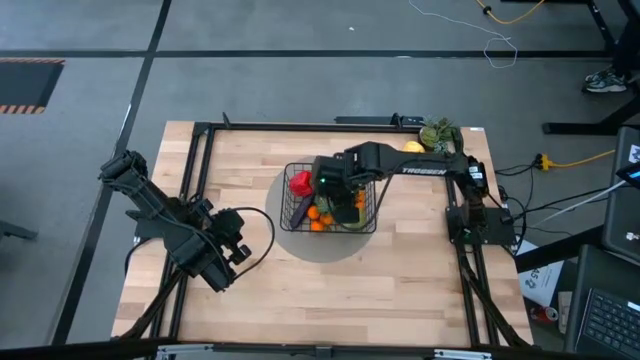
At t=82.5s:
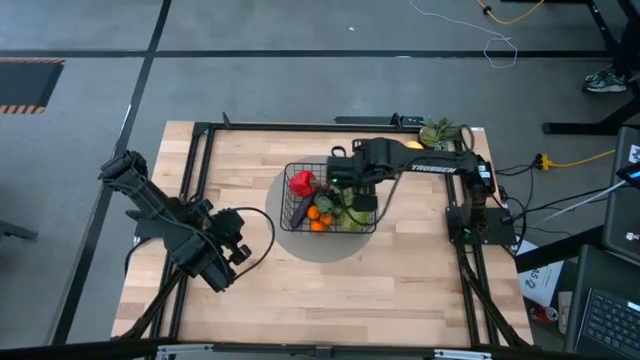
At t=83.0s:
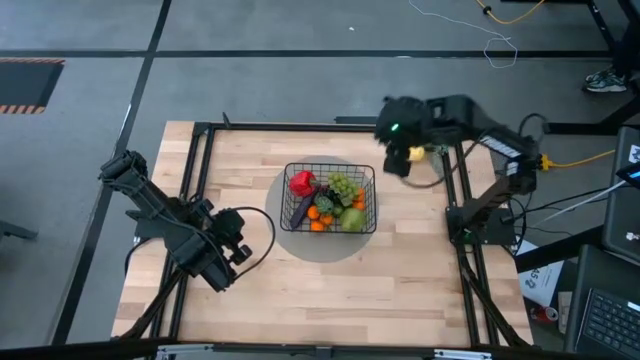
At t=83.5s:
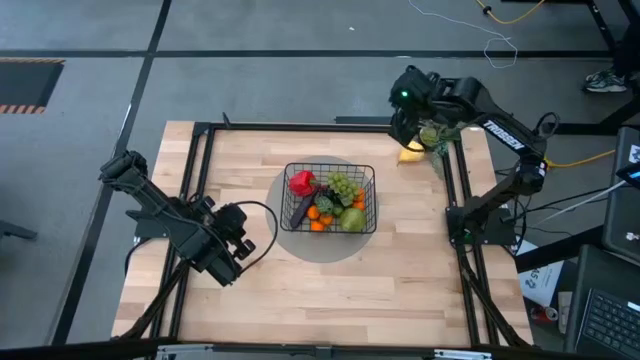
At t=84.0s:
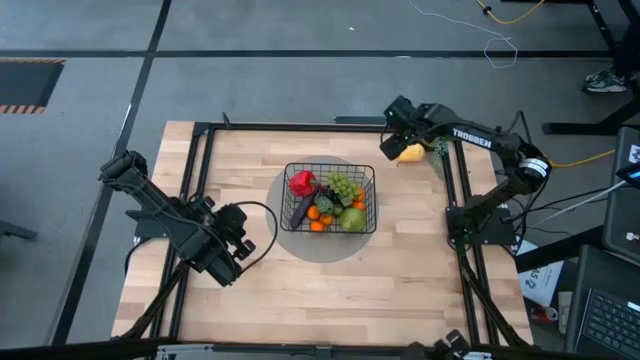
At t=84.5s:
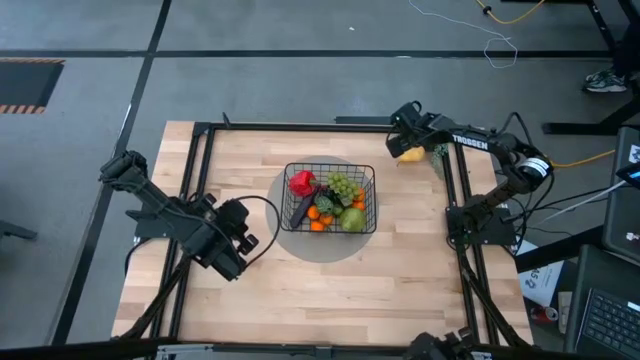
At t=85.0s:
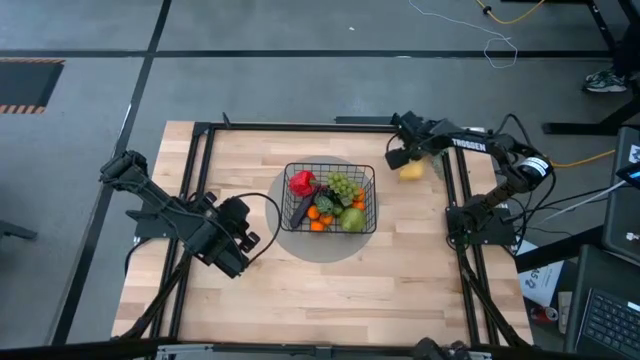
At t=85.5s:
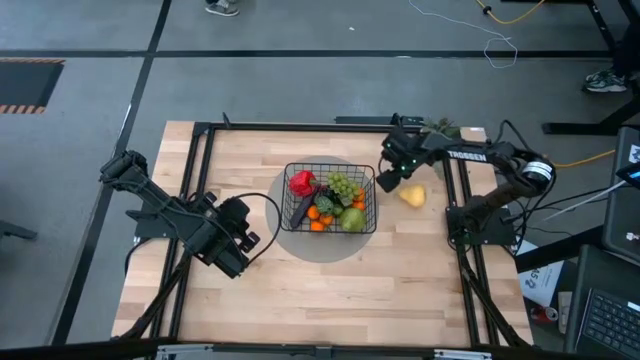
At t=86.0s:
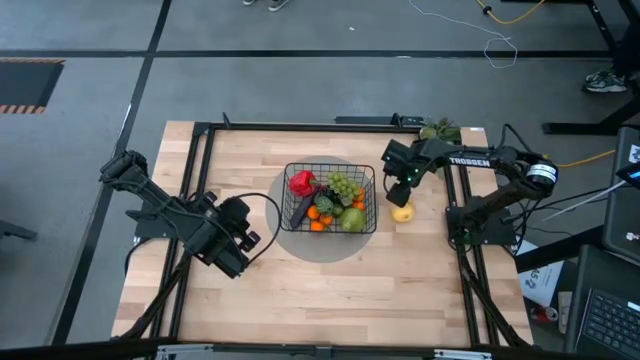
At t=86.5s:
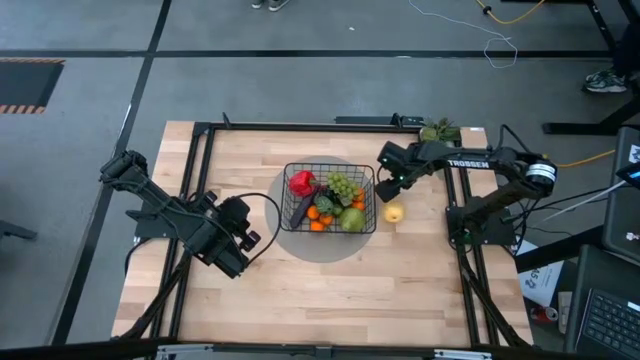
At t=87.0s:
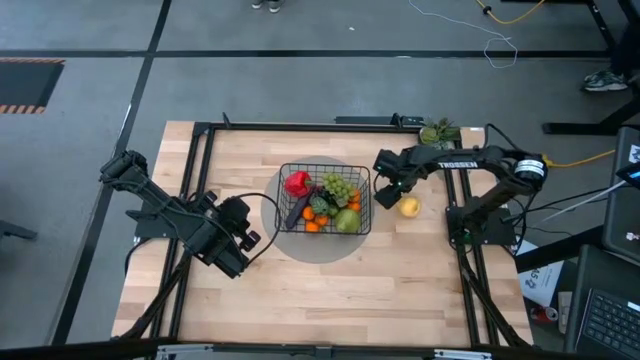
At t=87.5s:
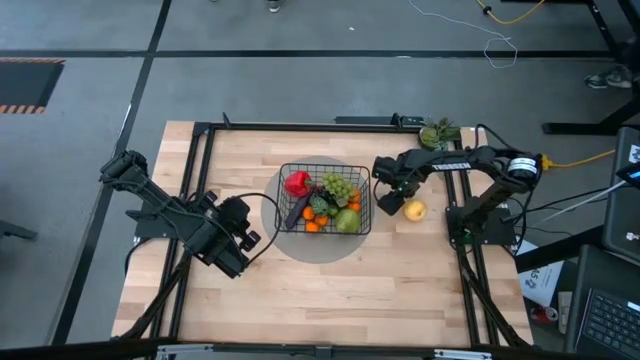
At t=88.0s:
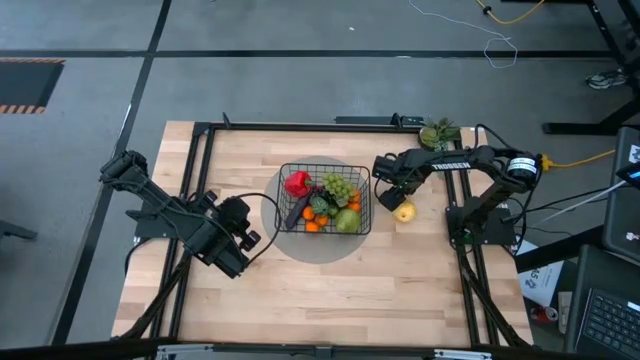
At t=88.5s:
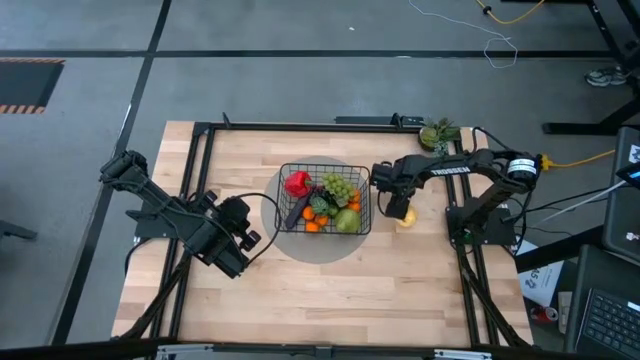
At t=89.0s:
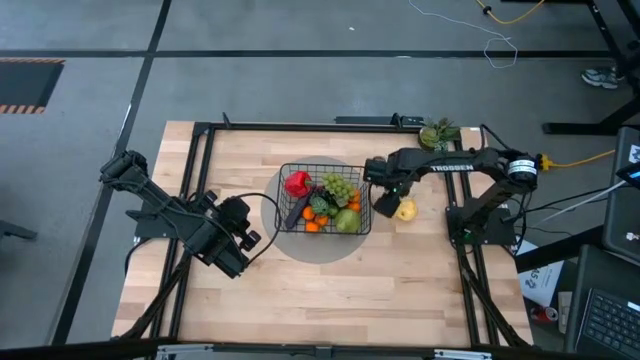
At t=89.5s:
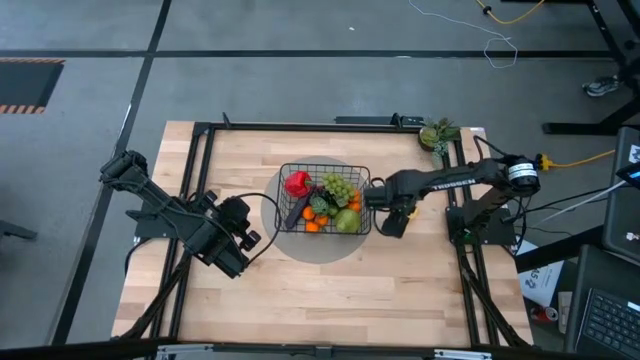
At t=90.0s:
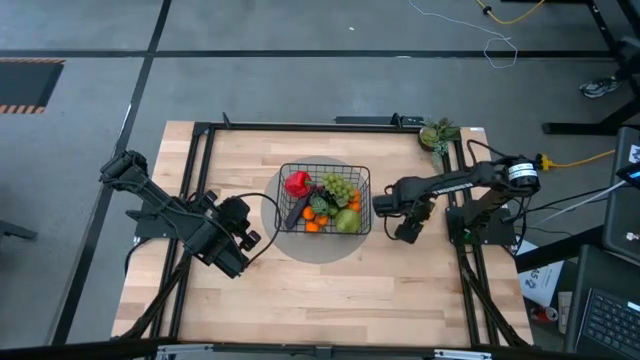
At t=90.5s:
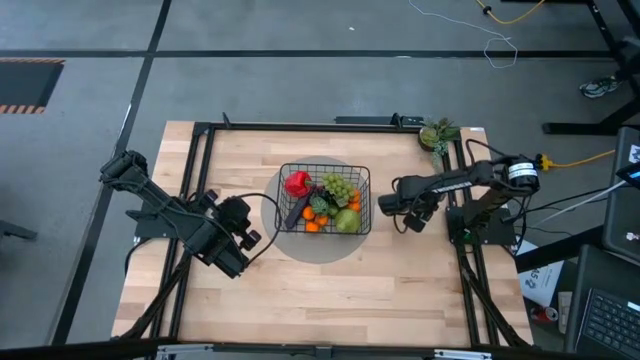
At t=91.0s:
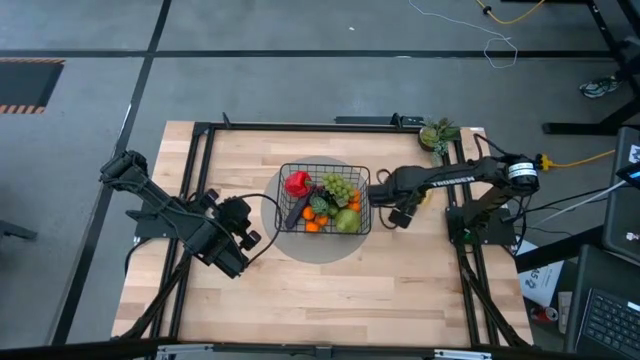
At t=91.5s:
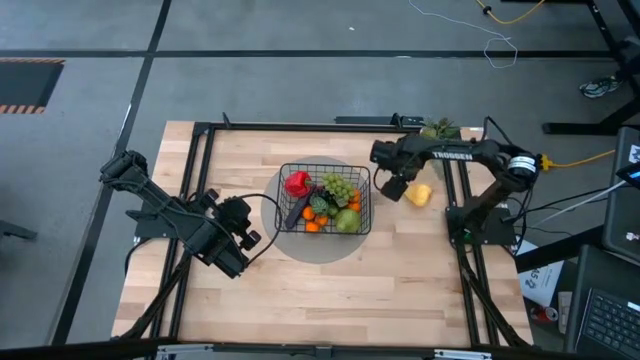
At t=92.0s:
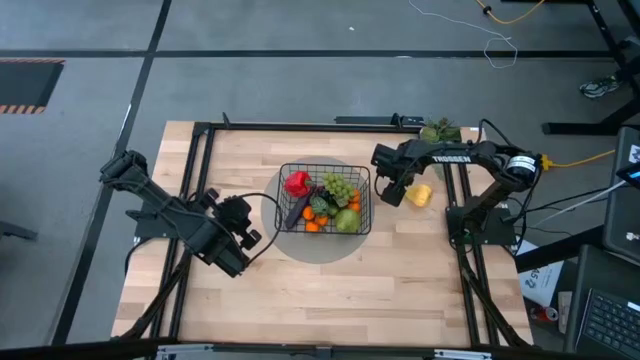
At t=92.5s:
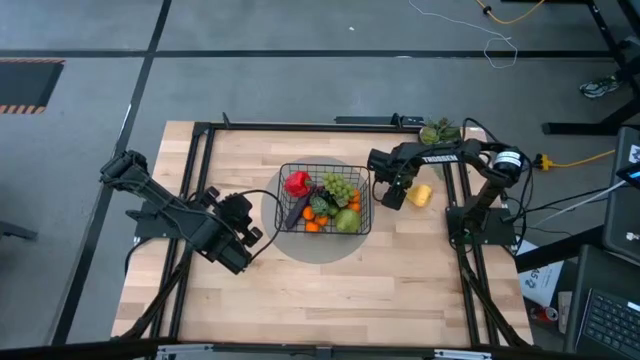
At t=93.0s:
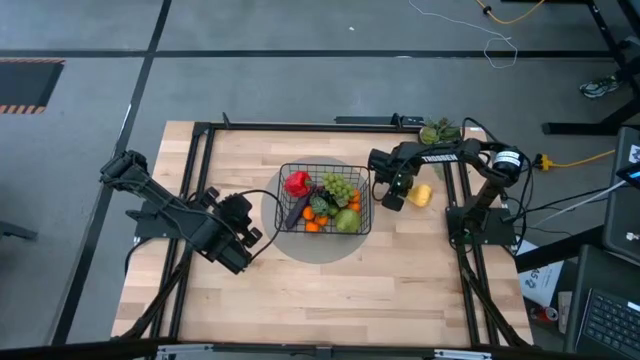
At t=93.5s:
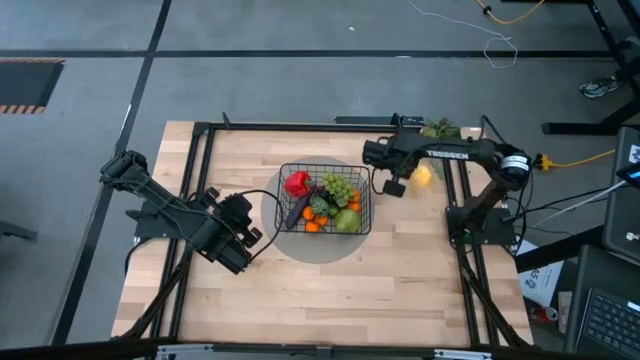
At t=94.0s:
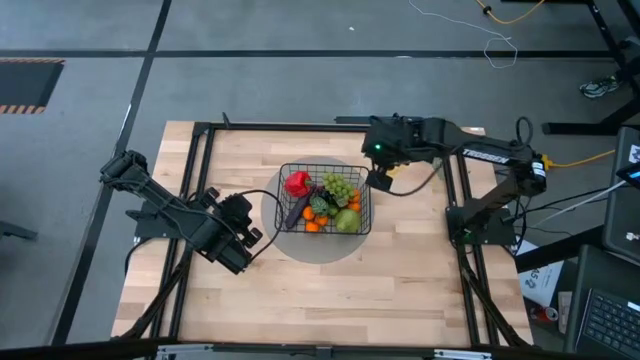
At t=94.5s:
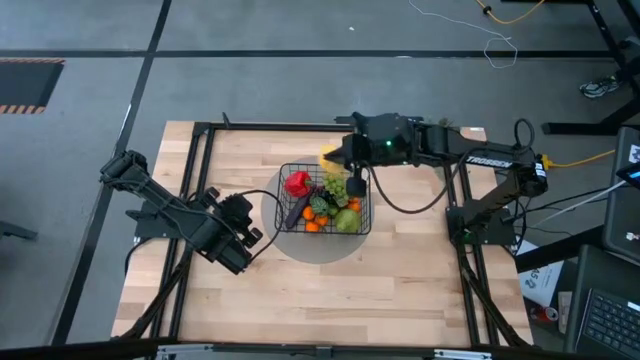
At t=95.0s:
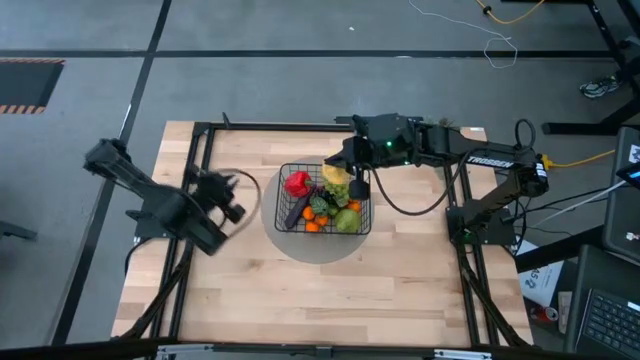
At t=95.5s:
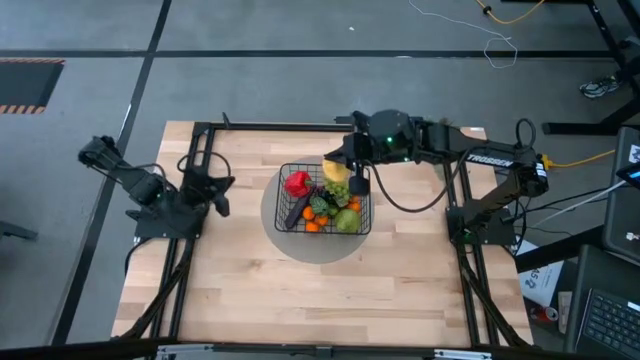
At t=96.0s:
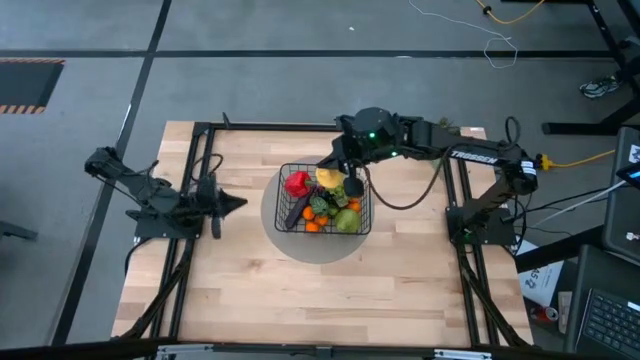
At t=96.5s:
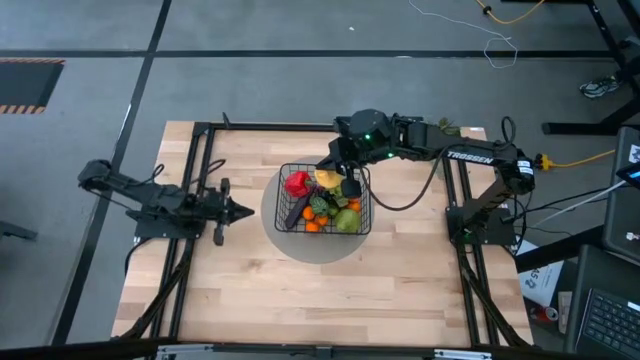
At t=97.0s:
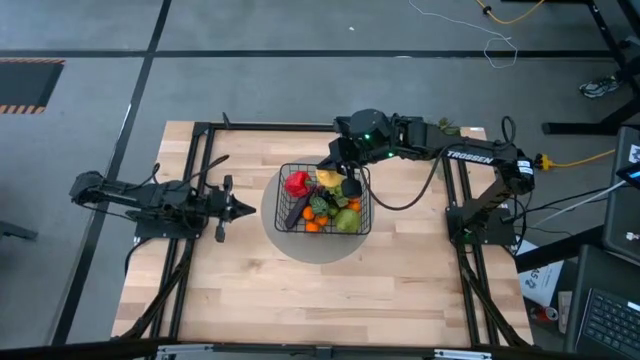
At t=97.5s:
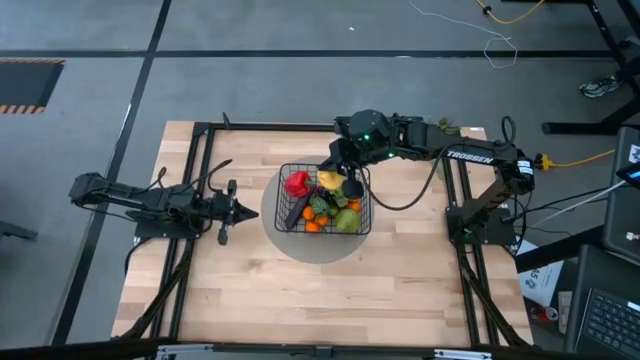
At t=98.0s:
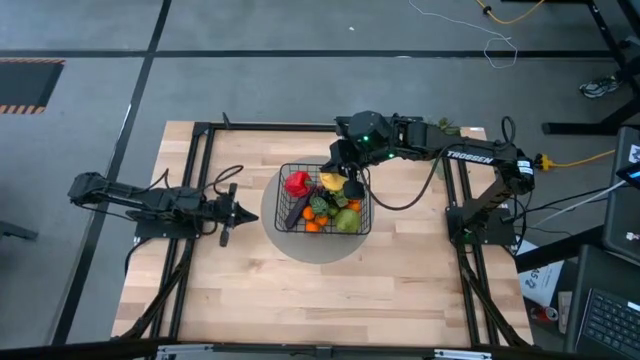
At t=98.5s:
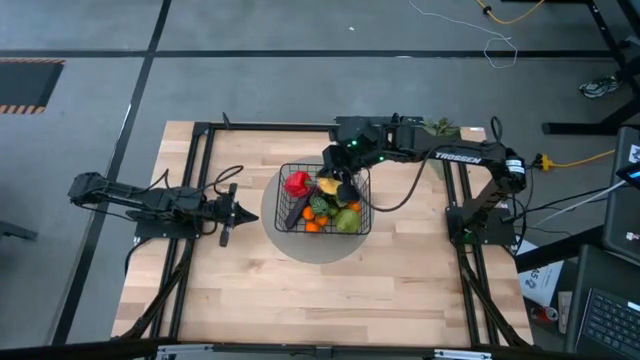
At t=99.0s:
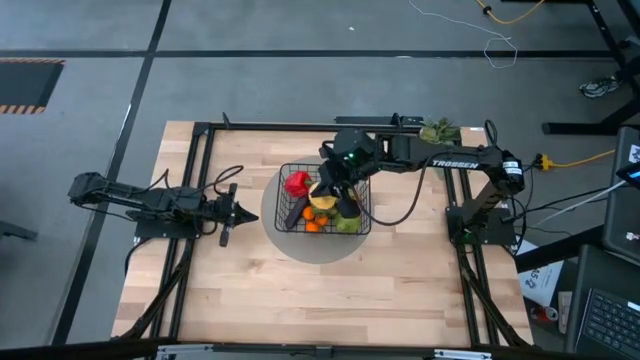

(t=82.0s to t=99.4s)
Task: Build produce basket
Put the yellow pear into the wire basket

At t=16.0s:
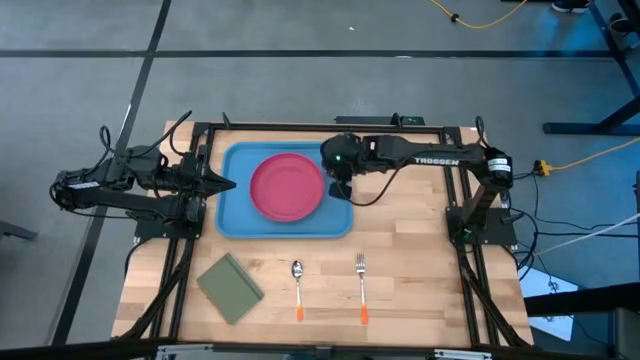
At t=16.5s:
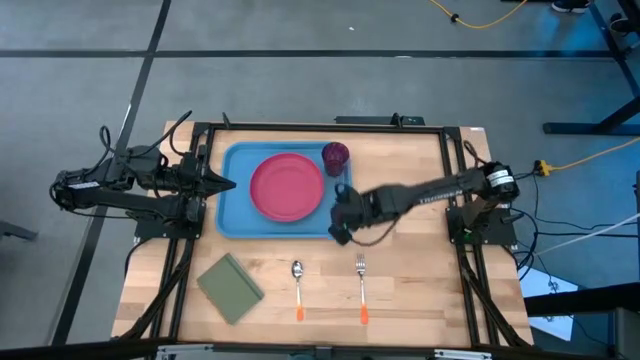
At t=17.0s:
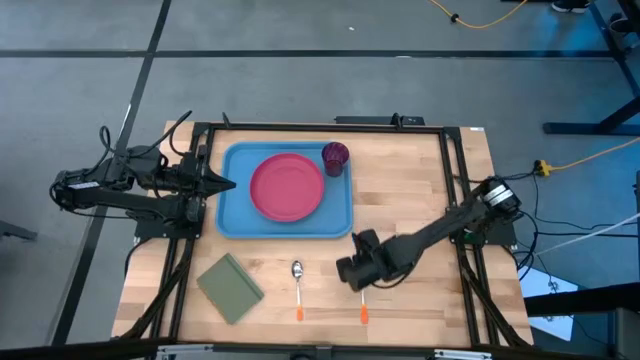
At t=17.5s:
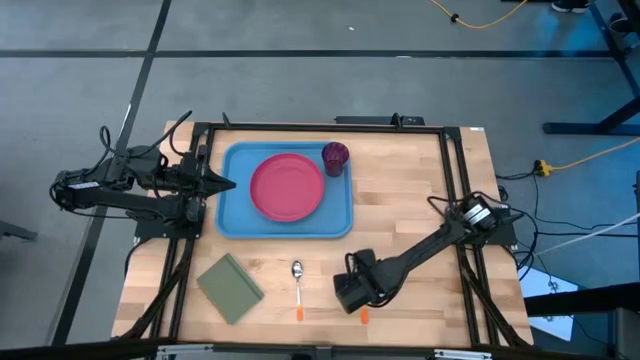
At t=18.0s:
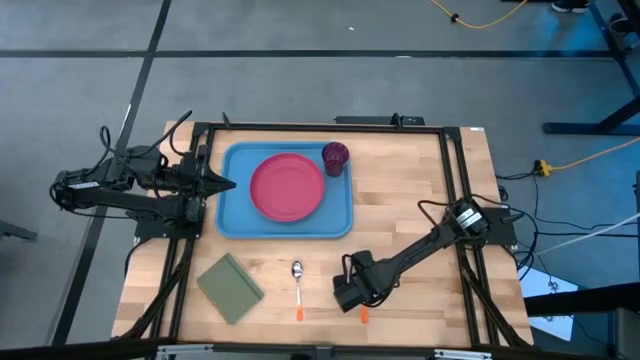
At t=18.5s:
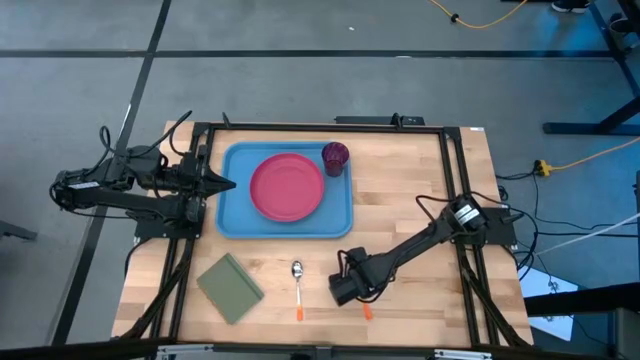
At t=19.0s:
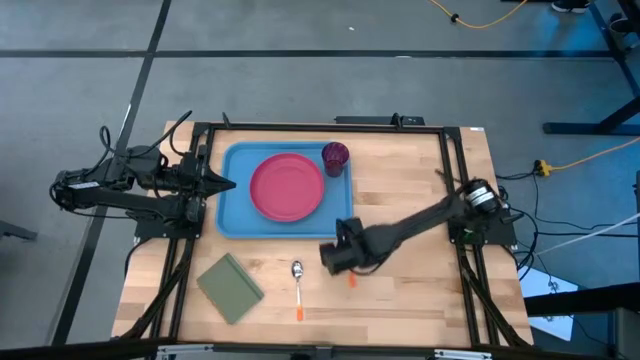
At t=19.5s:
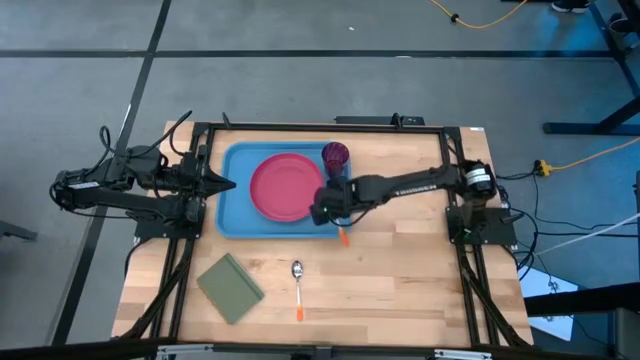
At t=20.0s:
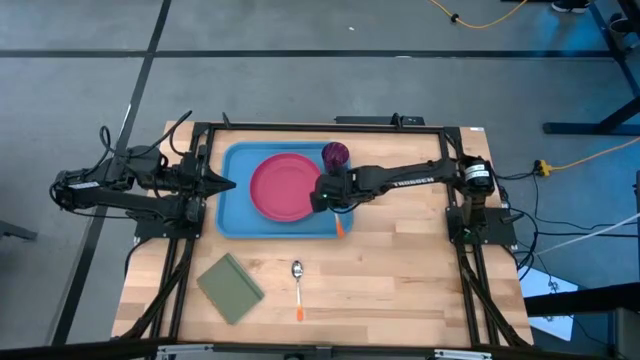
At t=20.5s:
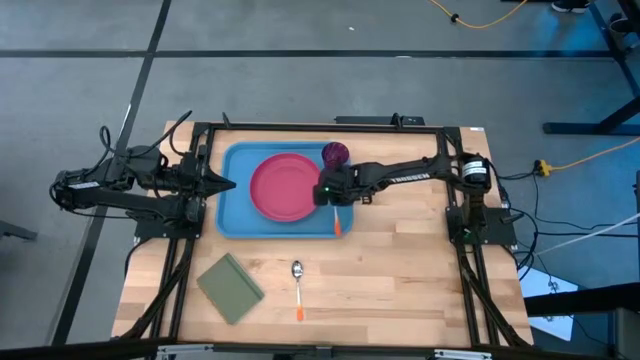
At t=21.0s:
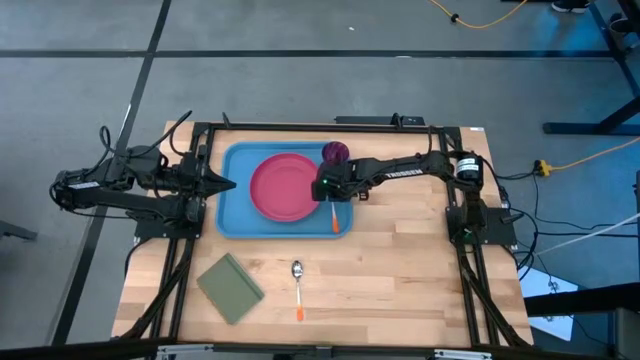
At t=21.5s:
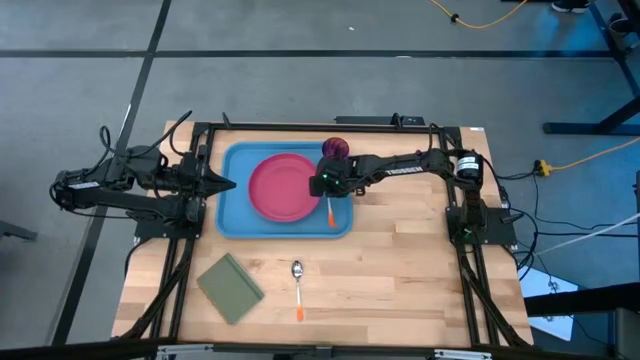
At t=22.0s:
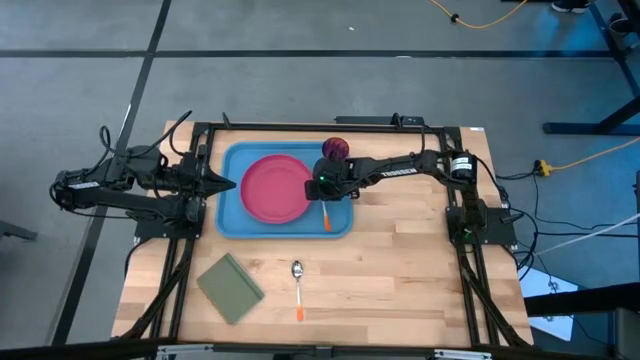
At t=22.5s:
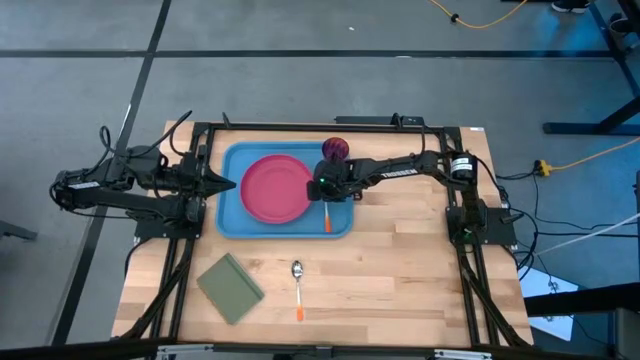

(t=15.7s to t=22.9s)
Task: Pick and place plate/cup/fork/spoon on tray
Put the orange fork into the blue tray beside the pink plate
